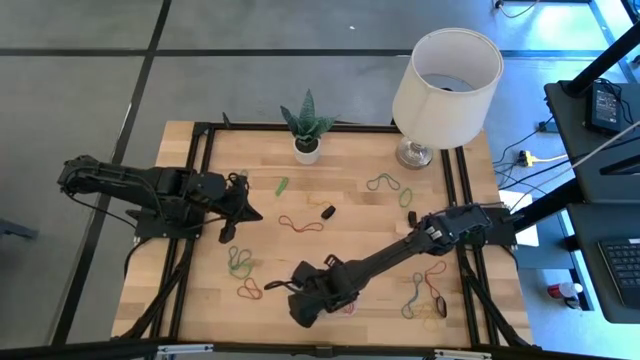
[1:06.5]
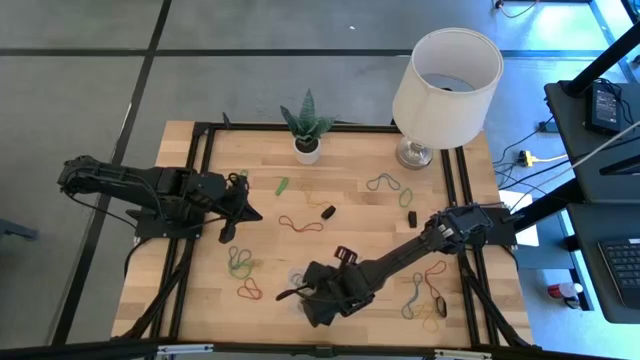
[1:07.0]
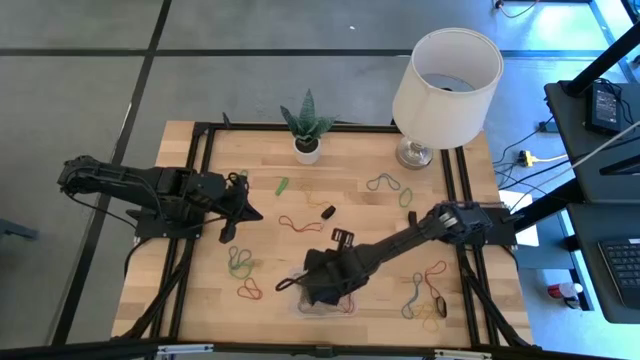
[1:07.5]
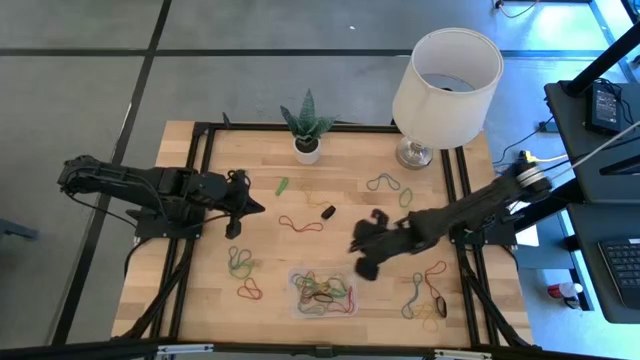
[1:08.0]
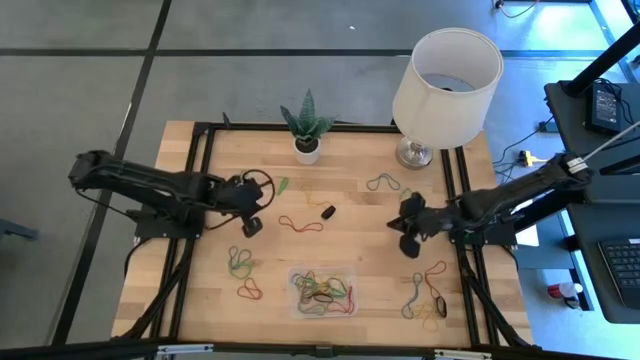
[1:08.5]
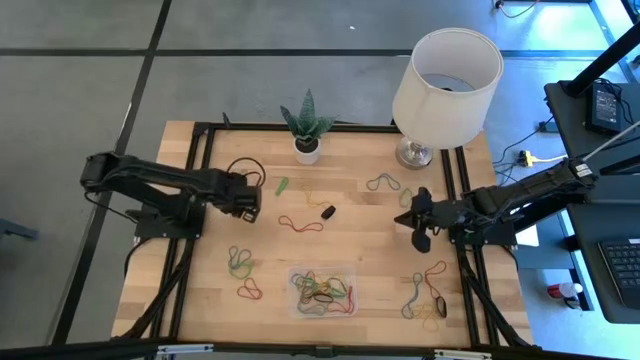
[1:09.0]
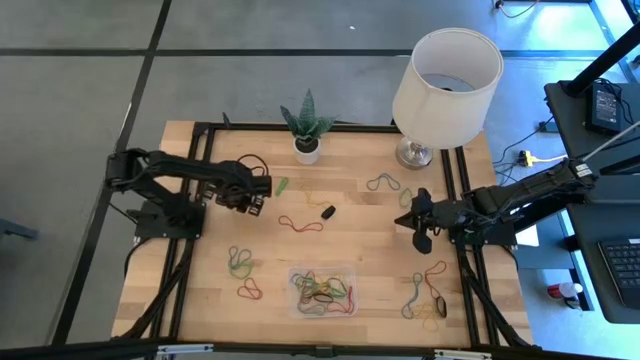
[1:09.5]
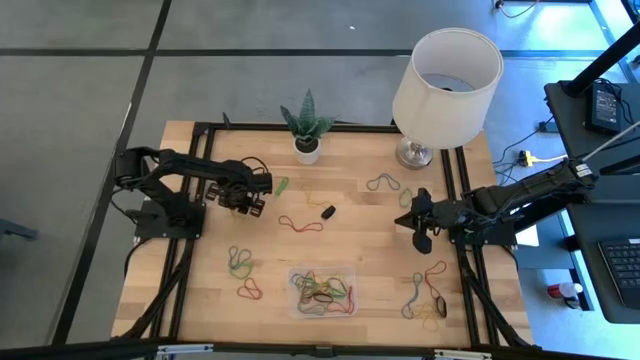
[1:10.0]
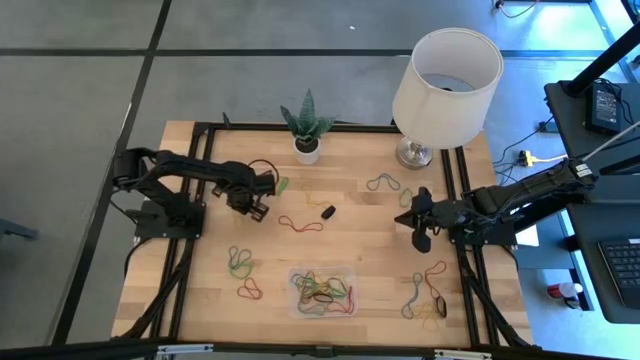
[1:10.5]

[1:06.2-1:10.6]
Task: Pick and place rubber bands into bin
Put the yellow rubber band into the transparent bin

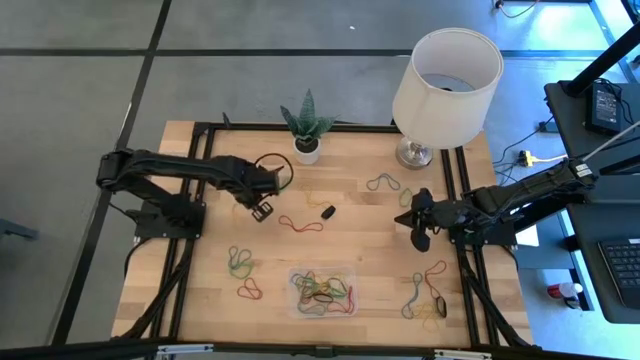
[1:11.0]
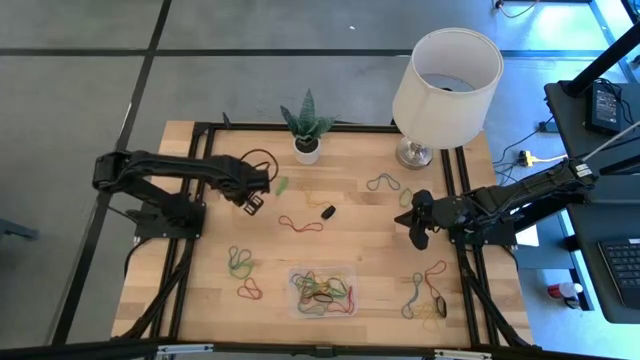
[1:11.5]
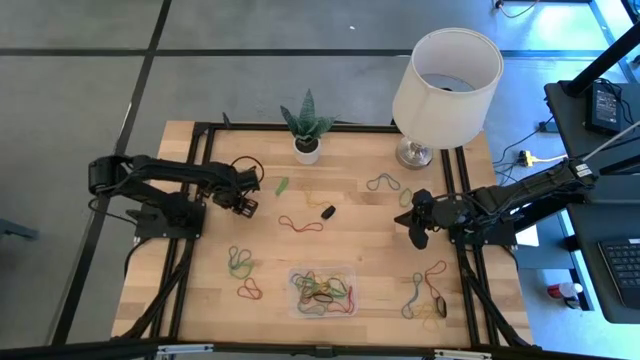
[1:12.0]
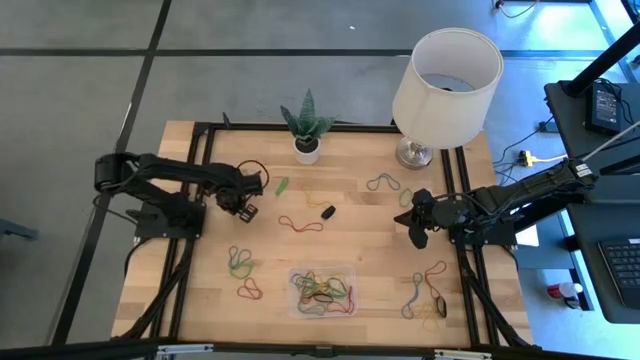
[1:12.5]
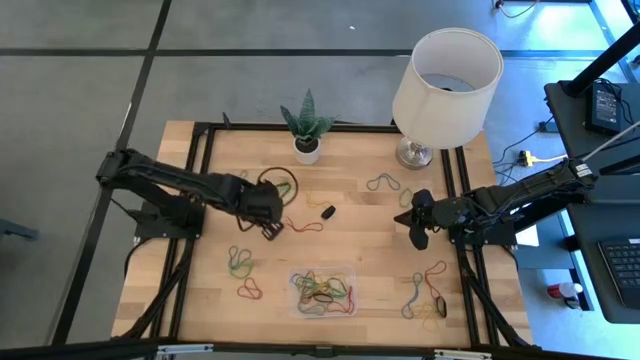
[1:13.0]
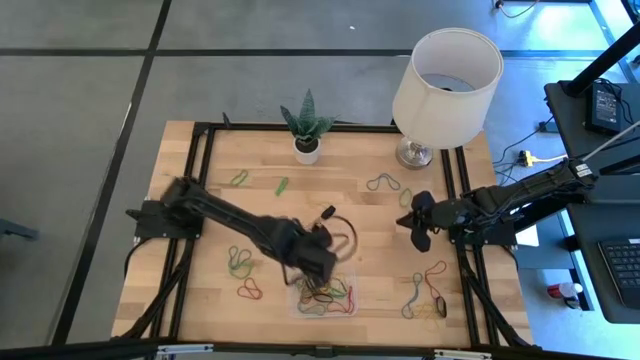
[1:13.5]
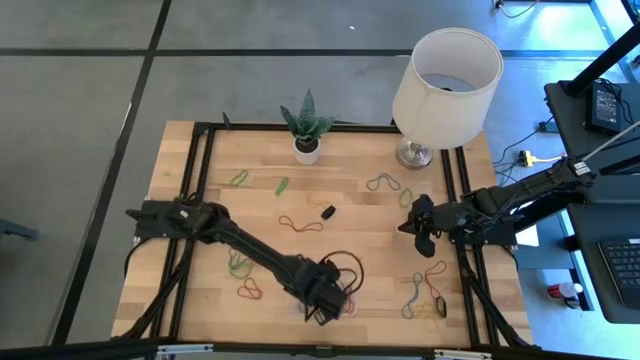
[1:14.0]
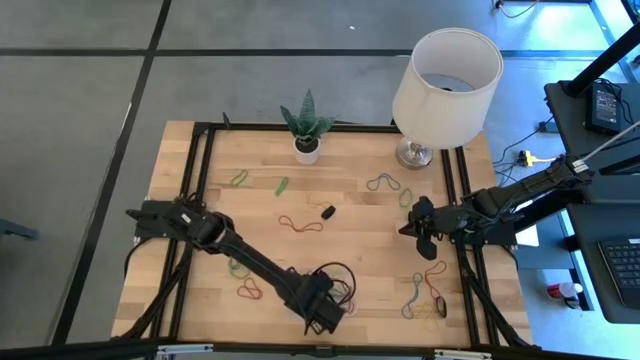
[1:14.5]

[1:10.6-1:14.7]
Put the yellow rubber band into the transparent bin

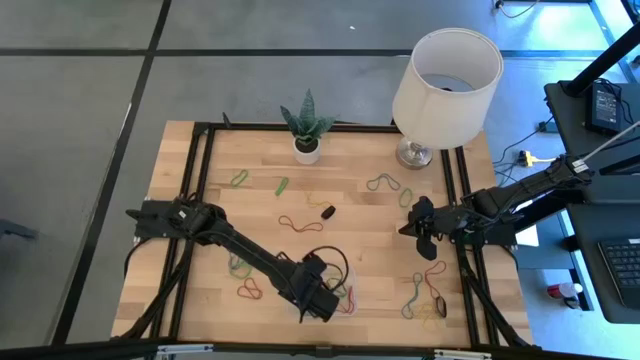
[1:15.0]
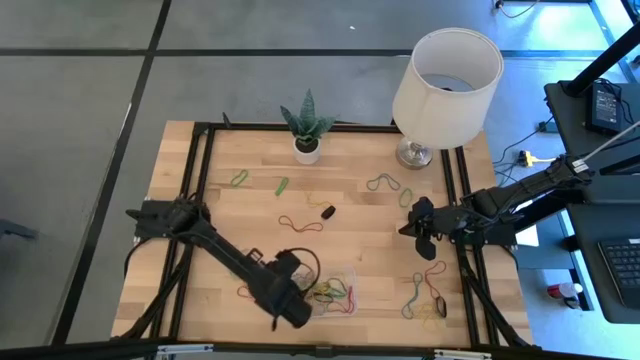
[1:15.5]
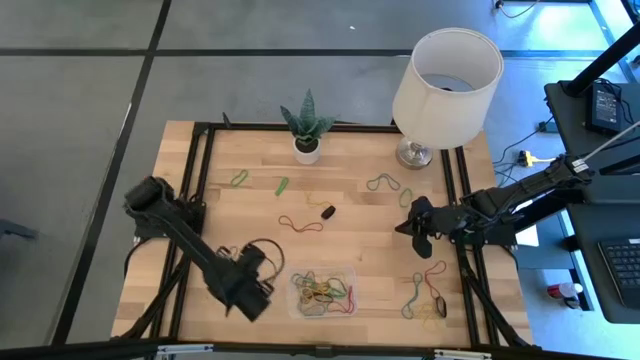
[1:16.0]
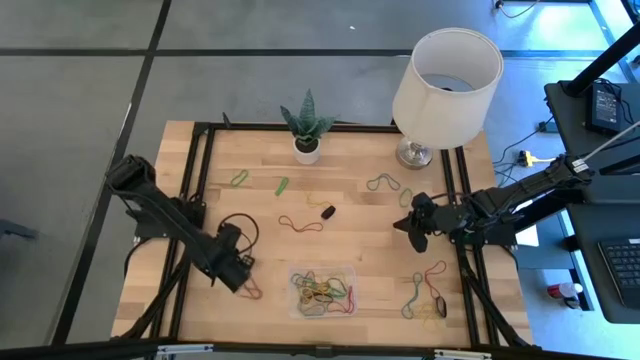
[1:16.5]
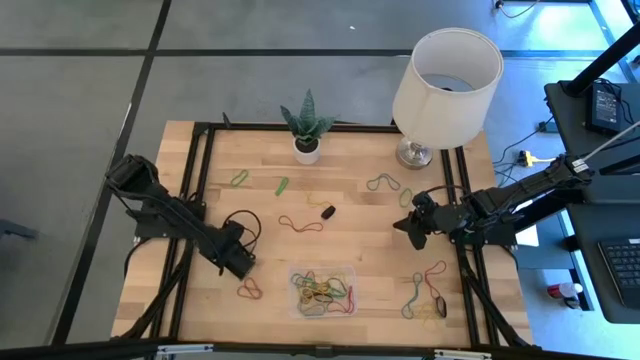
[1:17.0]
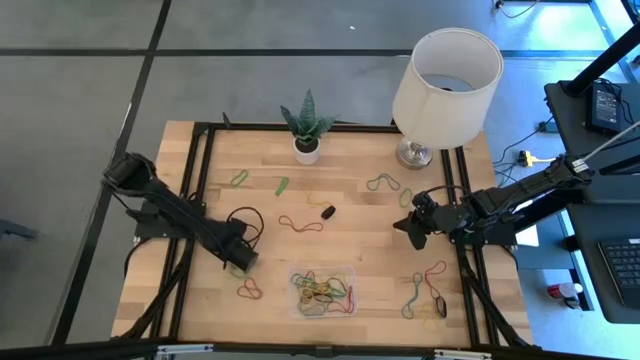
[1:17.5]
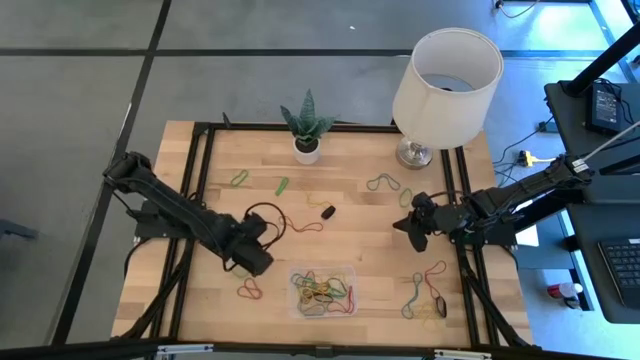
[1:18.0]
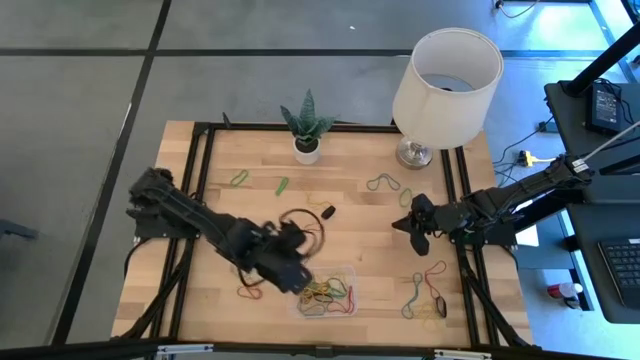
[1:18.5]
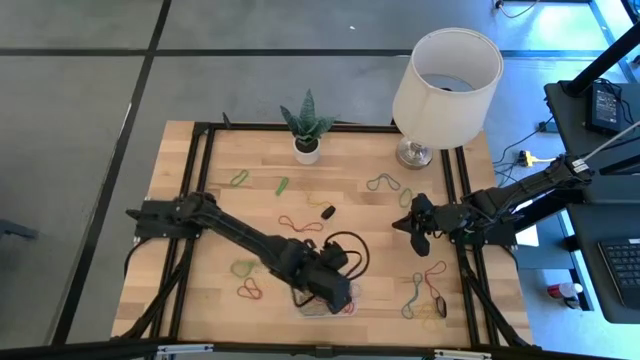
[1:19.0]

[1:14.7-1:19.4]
Put the blue rubber band into the transparent bin

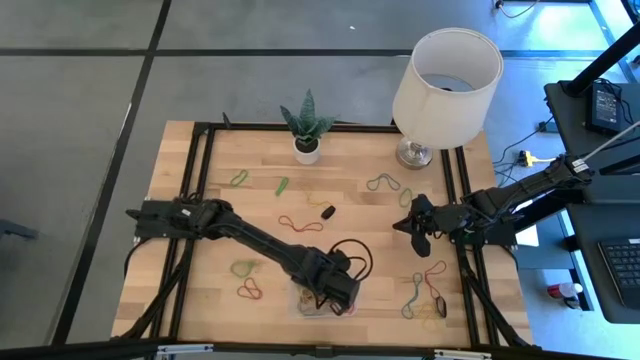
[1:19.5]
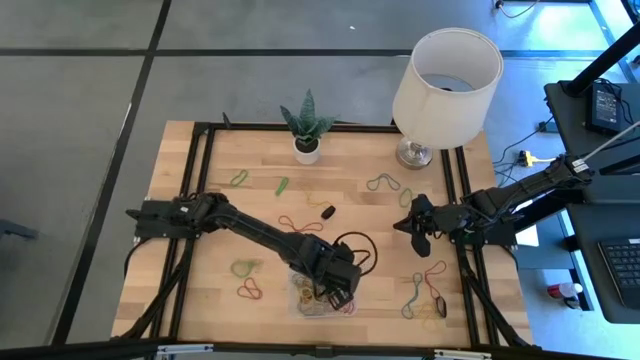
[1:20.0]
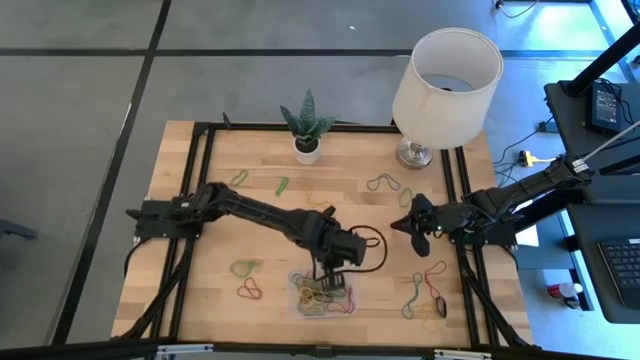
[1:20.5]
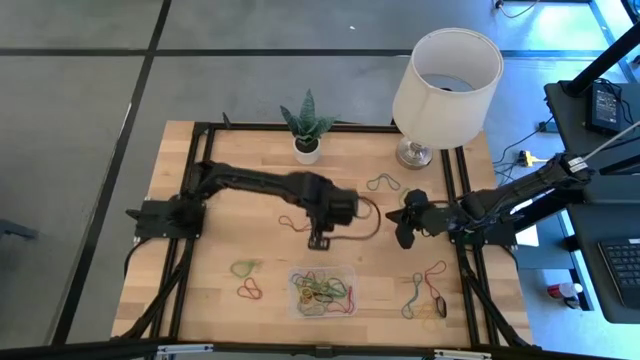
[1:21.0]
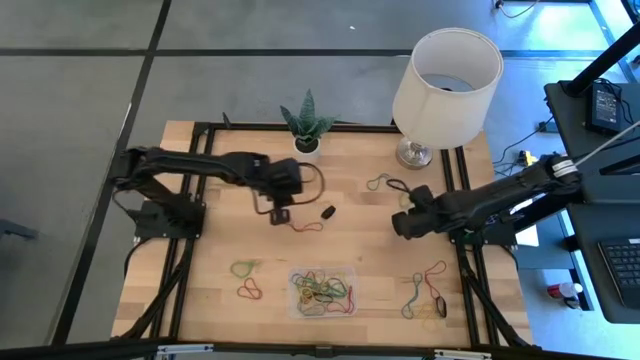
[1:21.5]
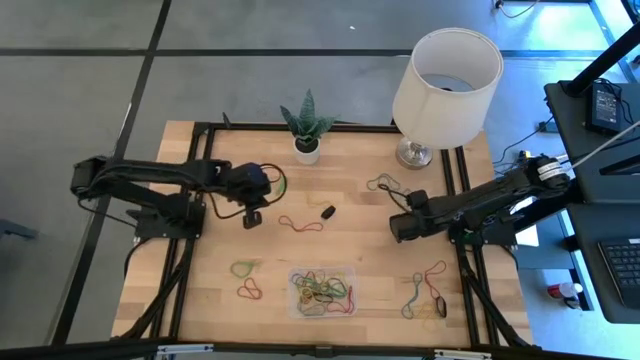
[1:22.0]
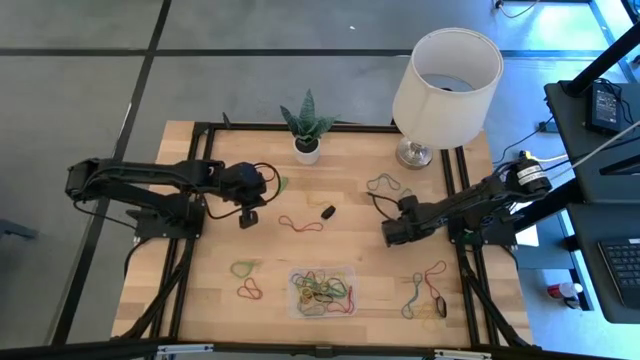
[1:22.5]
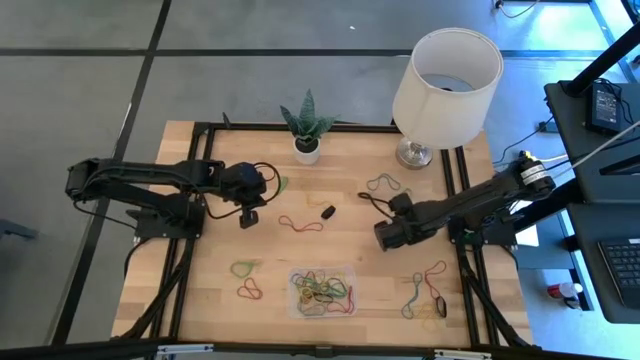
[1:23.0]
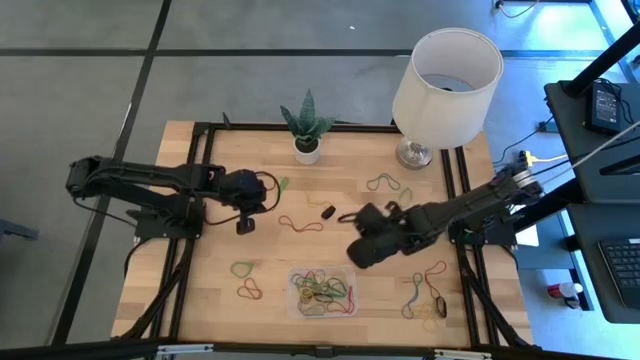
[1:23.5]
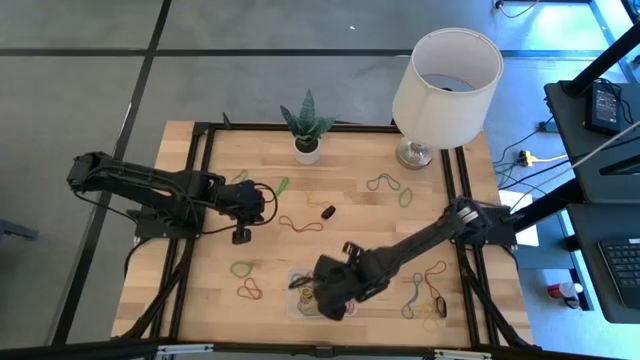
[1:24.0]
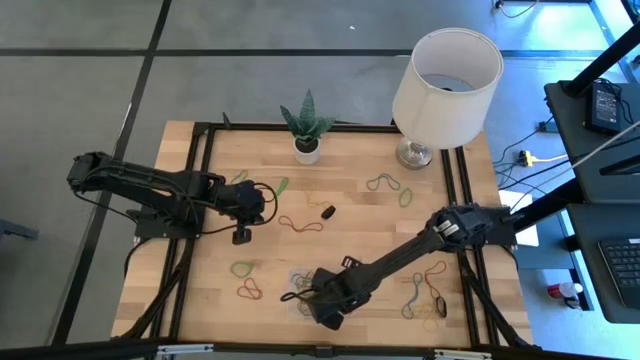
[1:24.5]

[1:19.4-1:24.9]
Put the black rubber band into the transparent bin

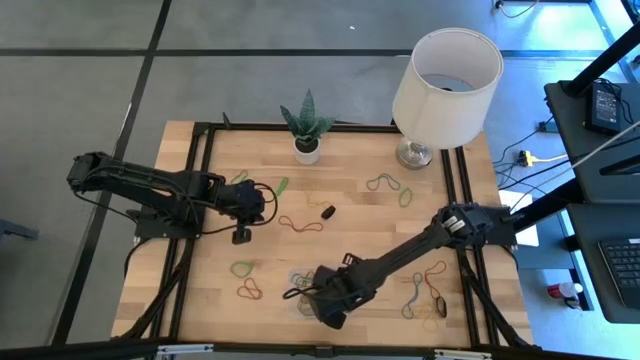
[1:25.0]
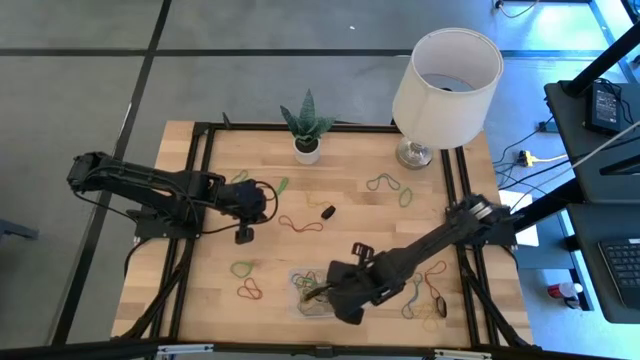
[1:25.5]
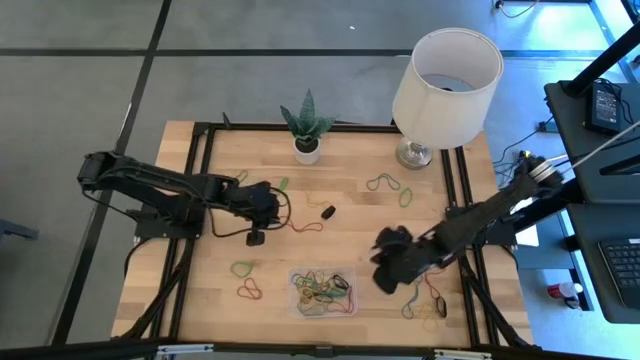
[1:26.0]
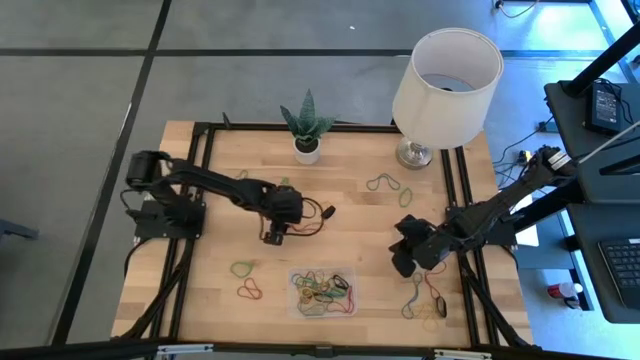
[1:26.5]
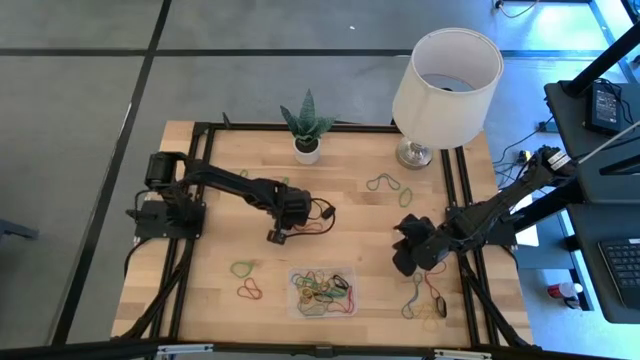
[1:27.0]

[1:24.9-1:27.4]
Put the red rubber band into the transparent bin
